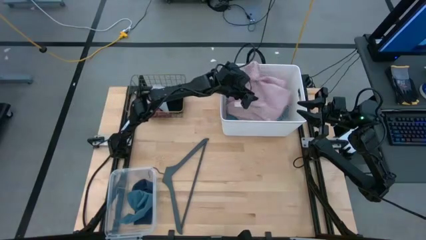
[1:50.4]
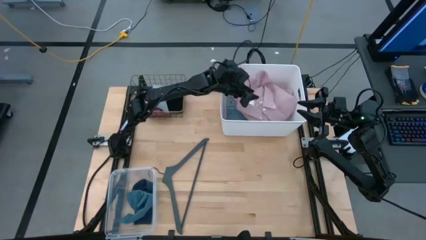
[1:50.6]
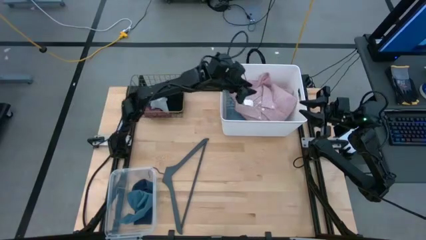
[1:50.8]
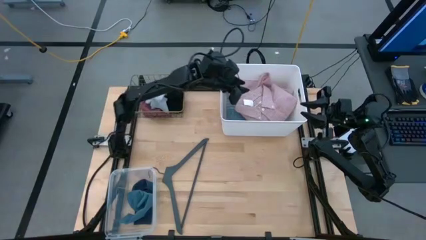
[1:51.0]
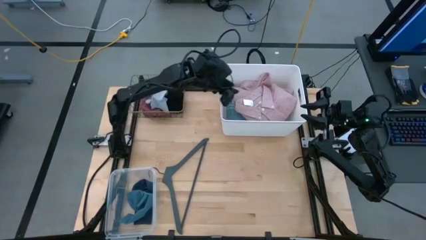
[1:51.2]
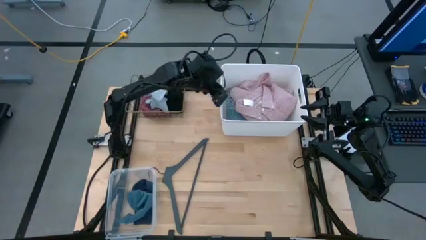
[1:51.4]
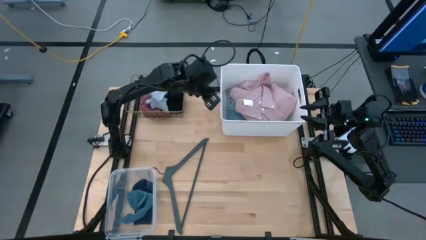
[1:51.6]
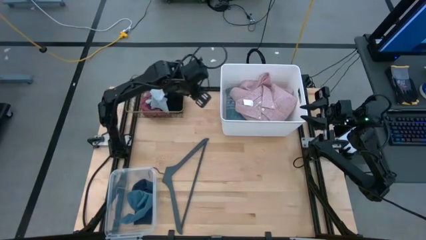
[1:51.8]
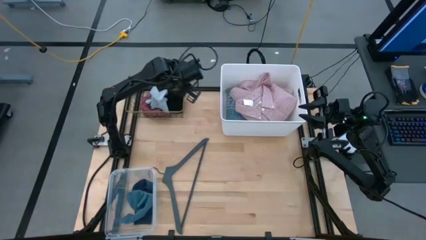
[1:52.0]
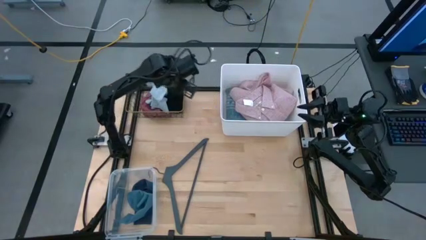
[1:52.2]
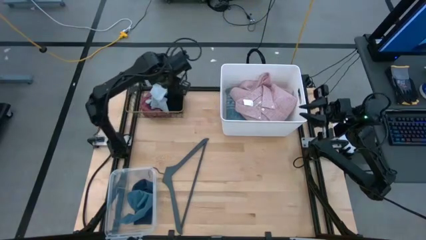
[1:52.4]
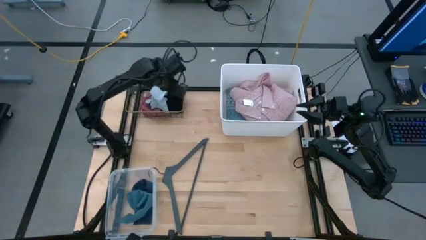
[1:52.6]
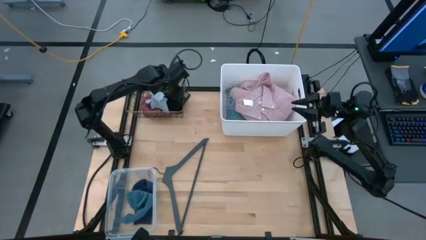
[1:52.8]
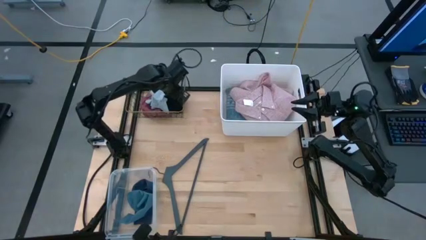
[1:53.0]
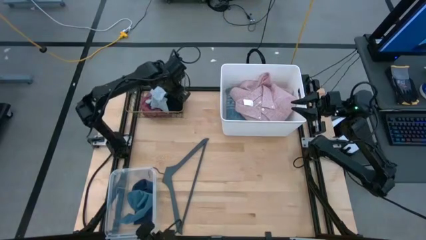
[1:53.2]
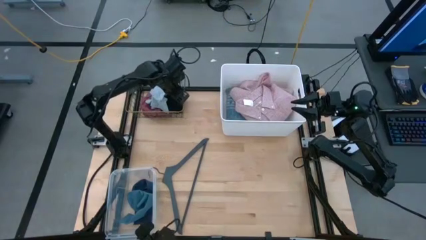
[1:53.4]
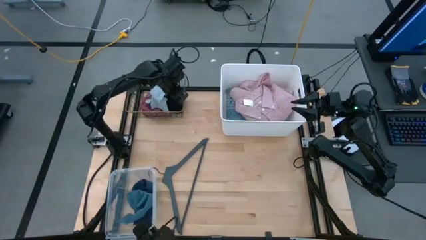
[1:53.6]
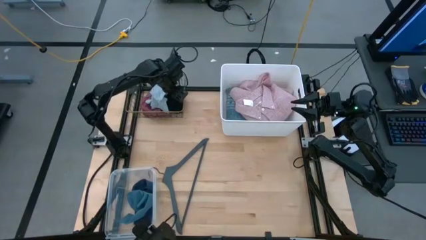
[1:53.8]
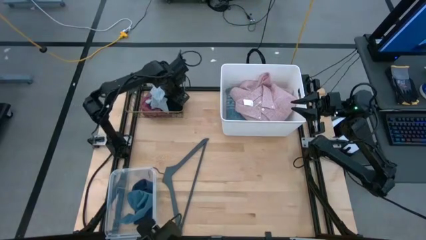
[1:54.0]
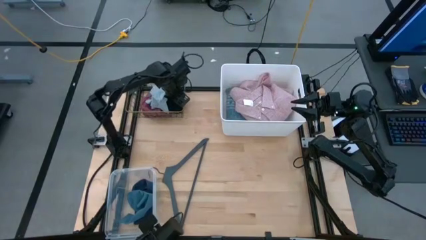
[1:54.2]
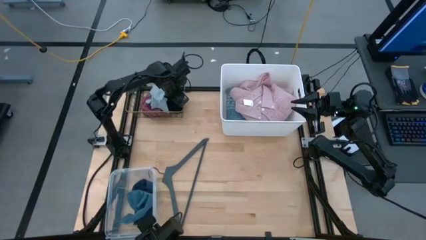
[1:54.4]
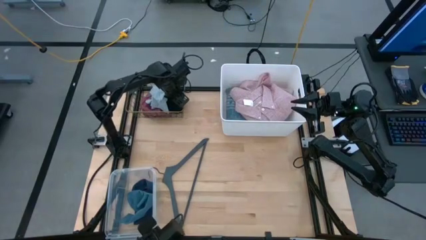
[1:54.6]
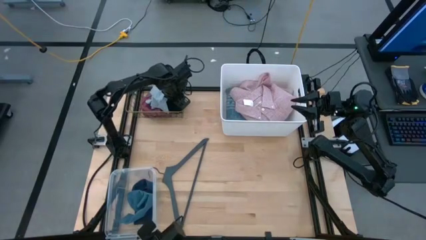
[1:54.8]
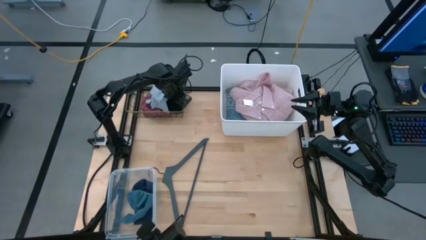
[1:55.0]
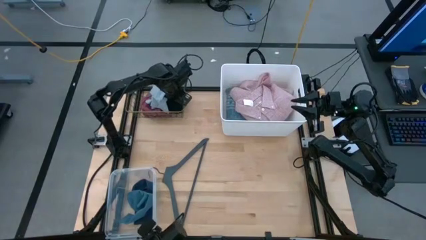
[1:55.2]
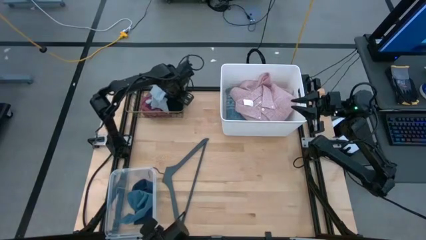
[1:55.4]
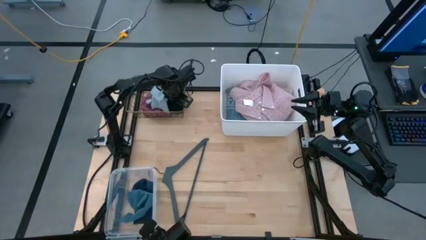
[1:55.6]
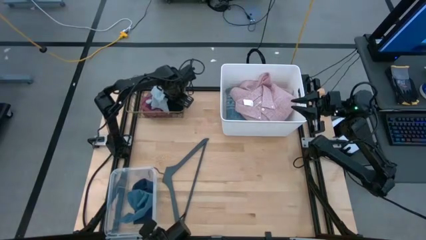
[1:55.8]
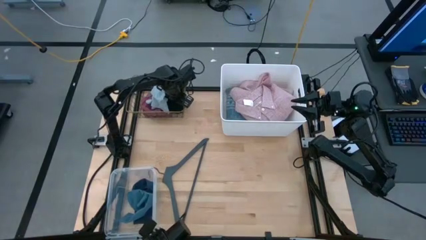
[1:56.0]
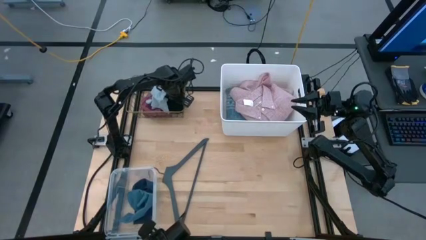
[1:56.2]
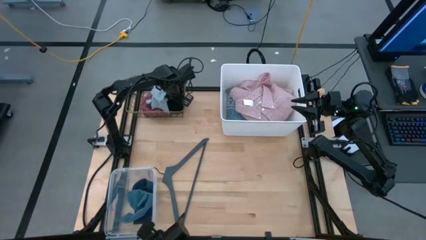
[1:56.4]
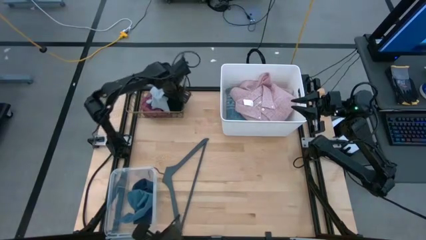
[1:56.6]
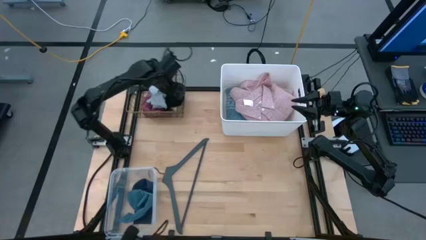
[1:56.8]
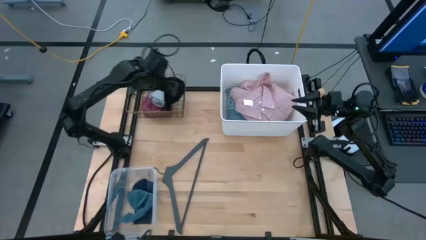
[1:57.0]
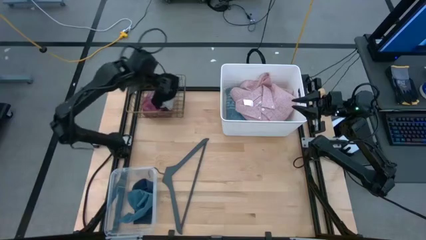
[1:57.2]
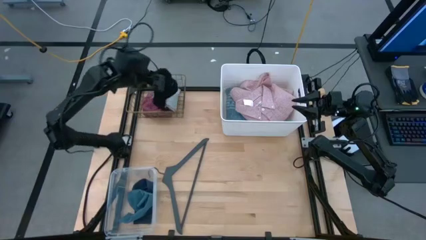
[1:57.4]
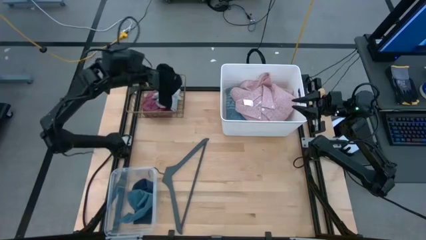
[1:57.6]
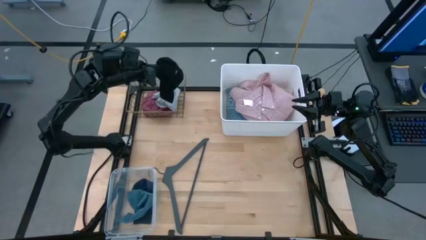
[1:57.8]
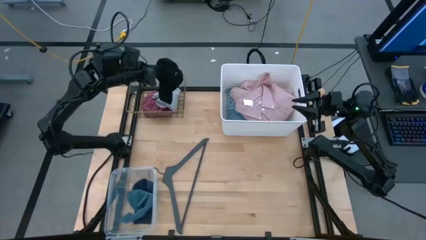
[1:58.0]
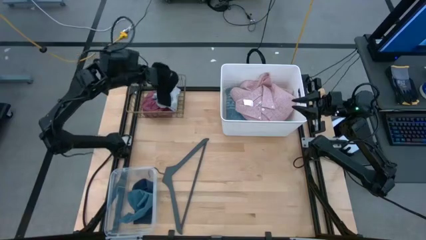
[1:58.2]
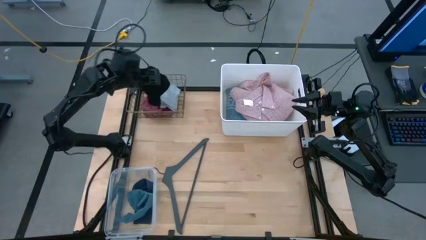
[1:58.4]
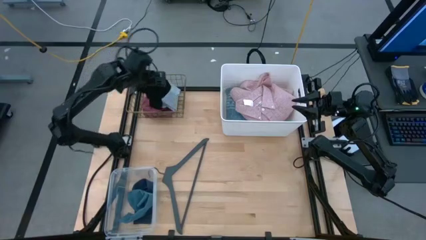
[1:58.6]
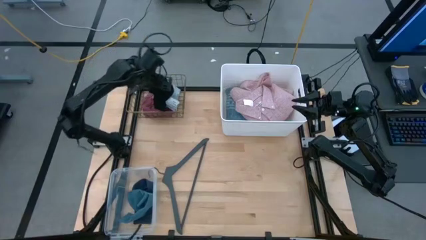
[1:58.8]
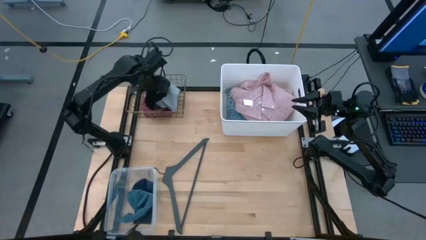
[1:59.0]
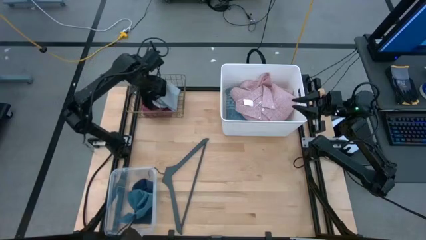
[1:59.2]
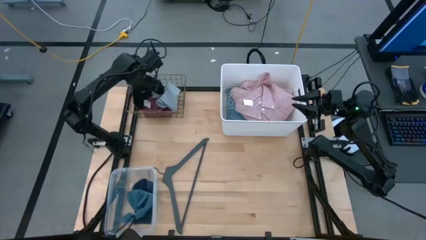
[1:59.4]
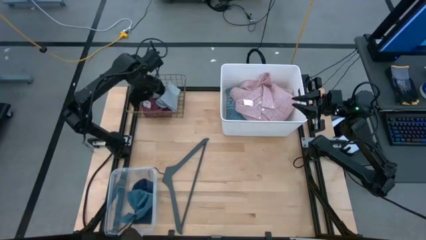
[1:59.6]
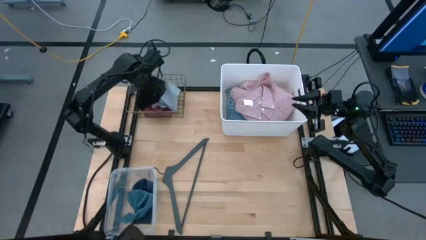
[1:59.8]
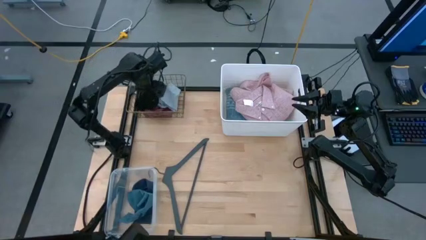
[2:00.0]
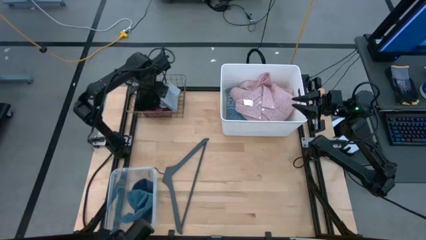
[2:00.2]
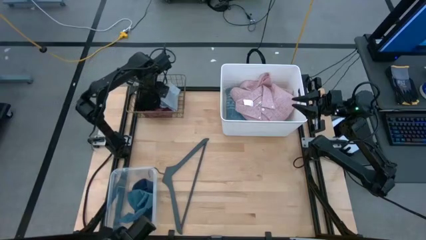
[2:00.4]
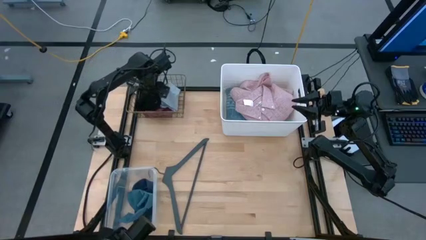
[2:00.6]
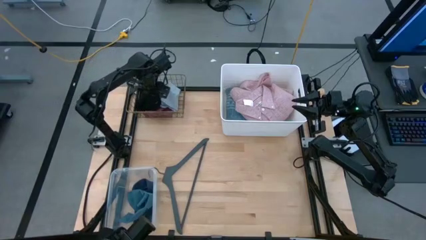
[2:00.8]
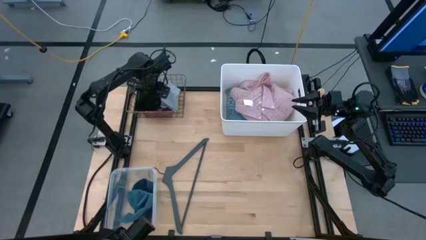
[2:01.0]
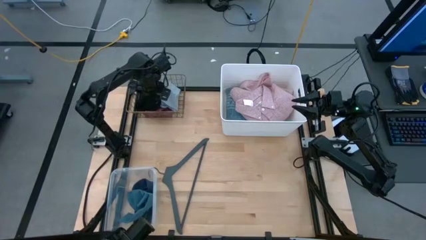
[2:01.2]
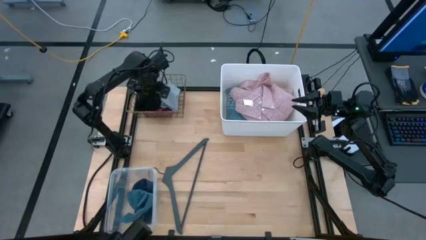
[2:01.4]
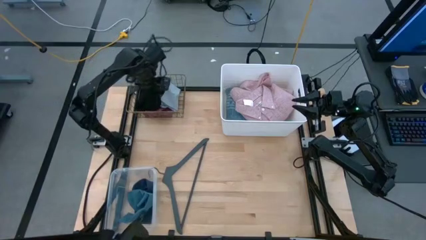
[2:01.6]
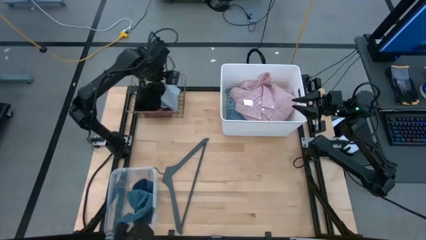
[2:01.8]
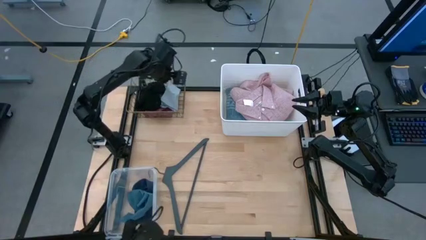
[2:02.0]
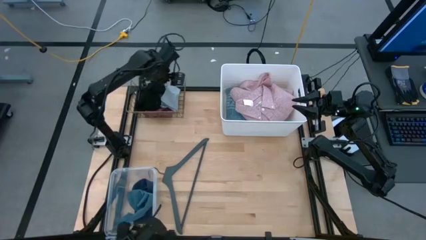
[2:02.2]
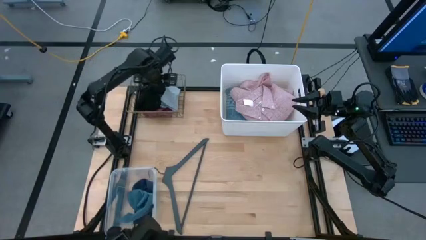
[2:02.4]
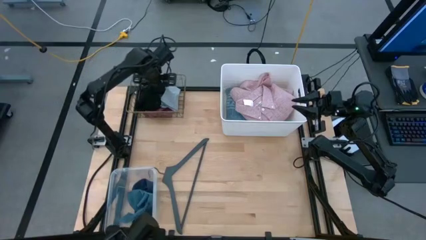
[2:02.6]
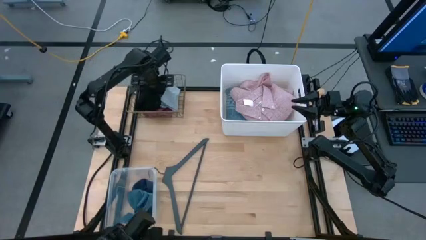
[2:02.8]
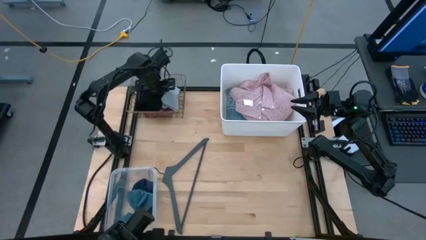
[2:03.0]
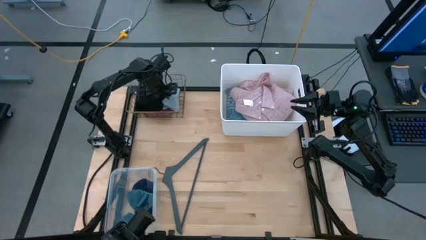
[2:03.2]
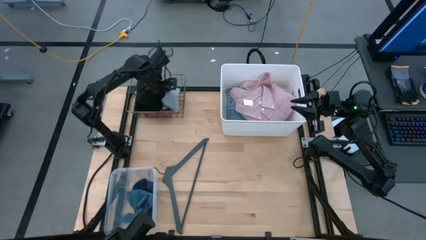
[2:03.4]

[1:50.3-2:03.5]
Task: Pick & Place Cloths
Adjust the black undergarment in the gold wire basket
